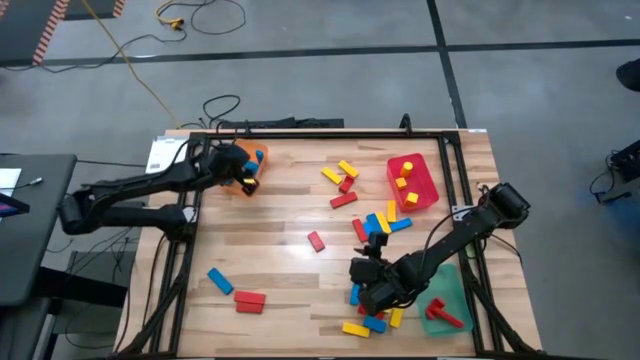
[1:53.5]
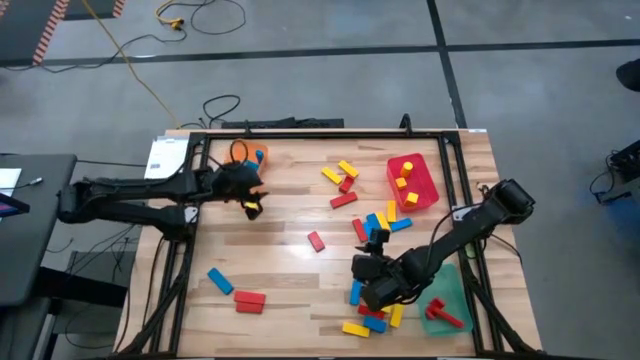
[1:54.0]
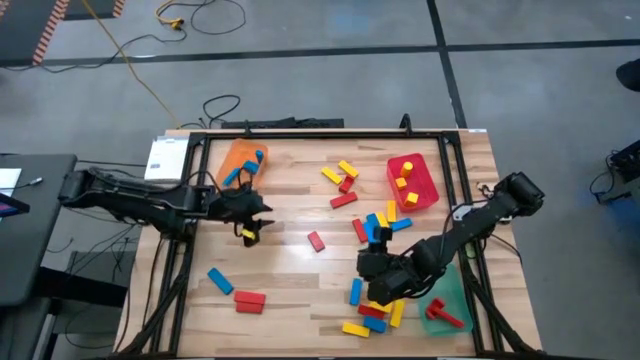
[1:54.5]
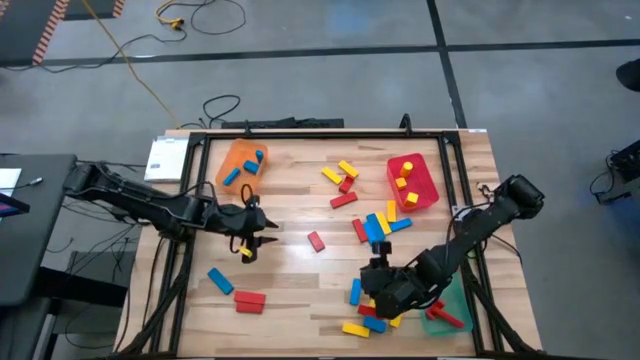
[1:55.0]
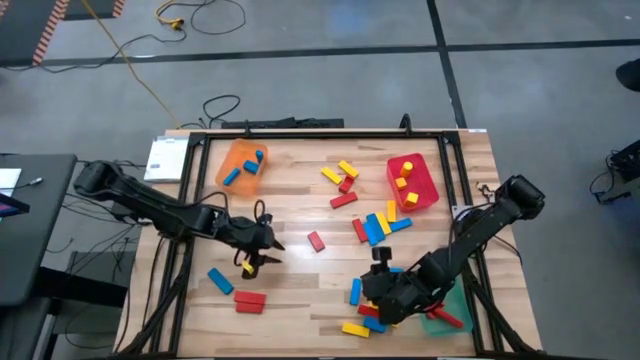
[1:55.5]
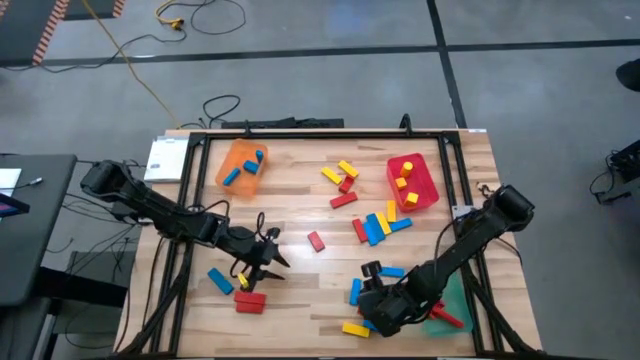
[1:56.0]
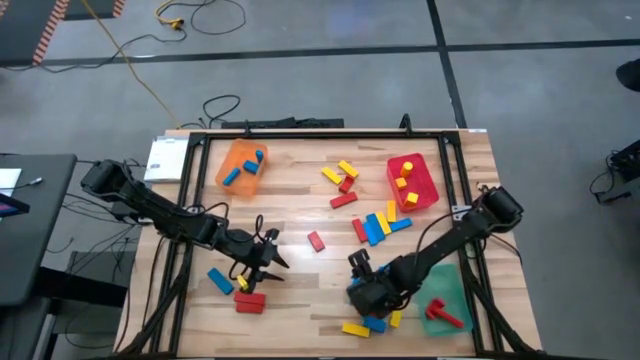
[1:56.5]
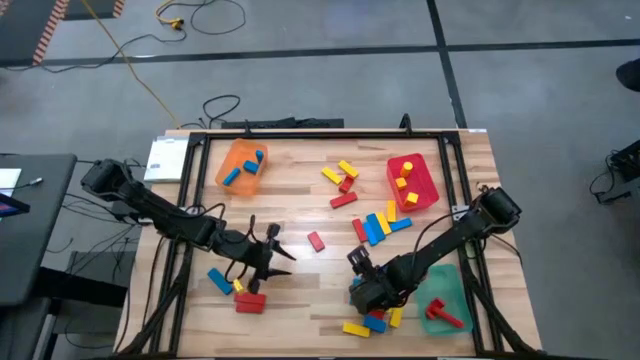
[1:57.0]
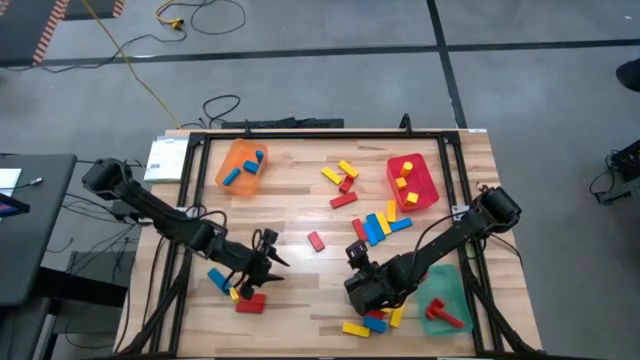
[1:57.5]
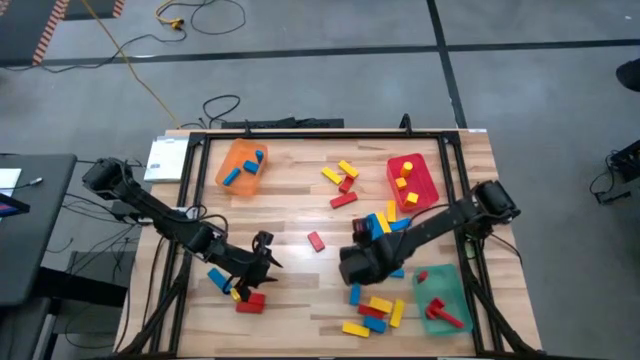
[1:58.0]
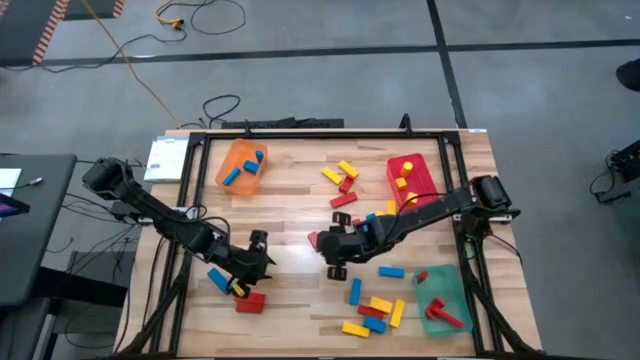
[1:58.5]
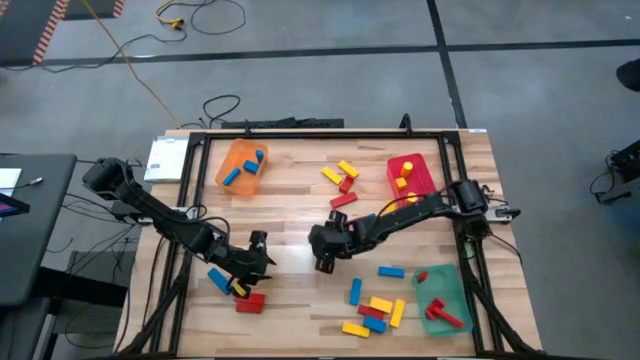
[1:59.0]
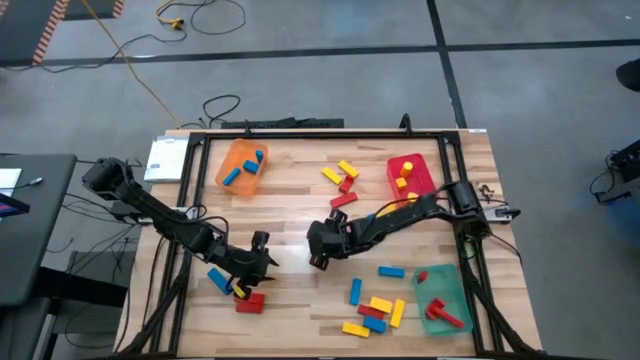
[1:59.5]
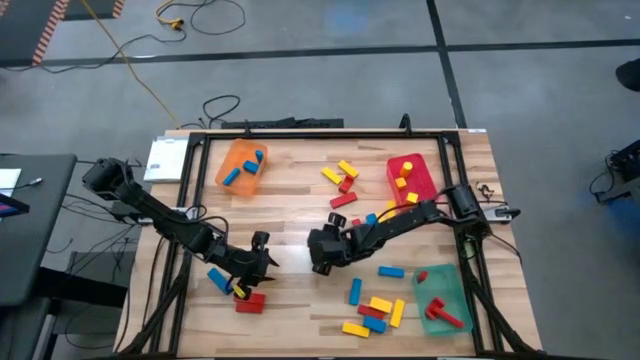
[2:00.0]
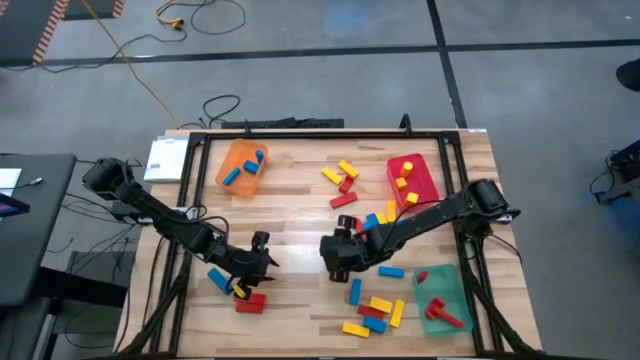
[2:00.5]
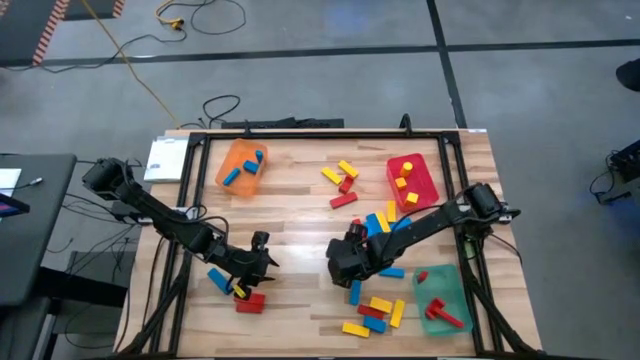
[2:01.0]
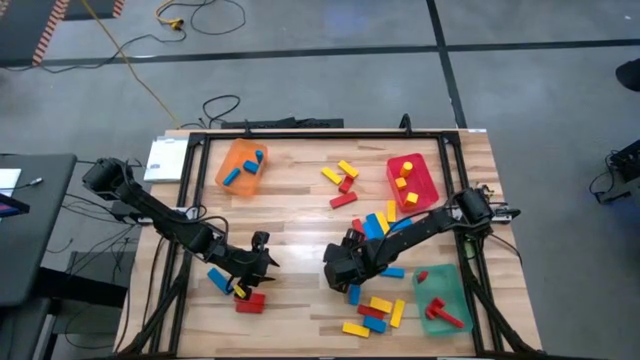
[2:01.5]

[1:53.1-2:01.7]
Task: Sort blocks
Put the red rectangle block into the green bin

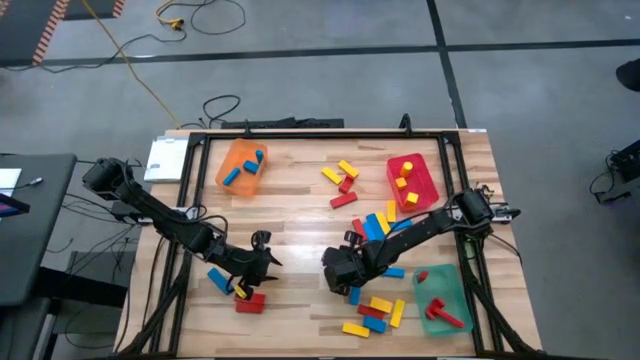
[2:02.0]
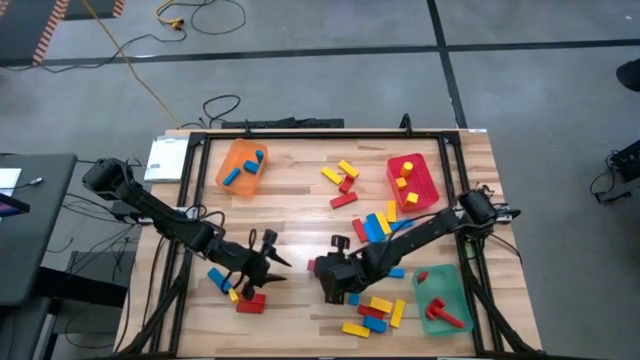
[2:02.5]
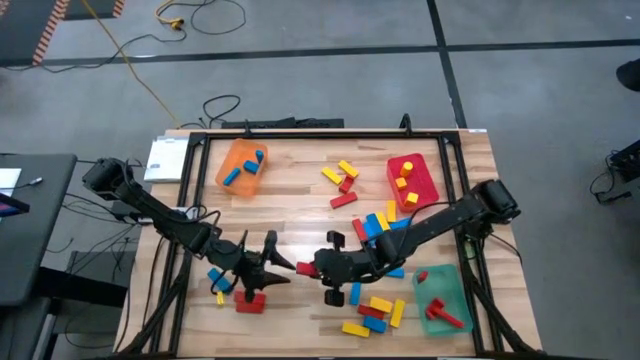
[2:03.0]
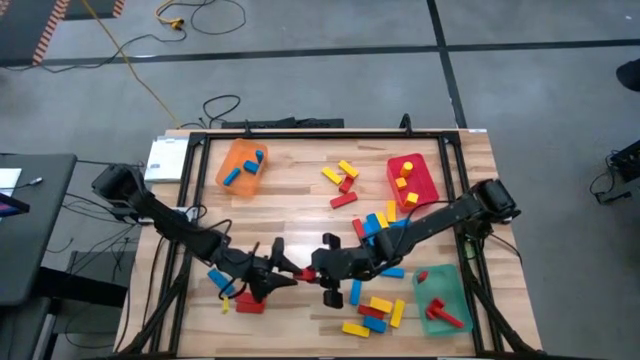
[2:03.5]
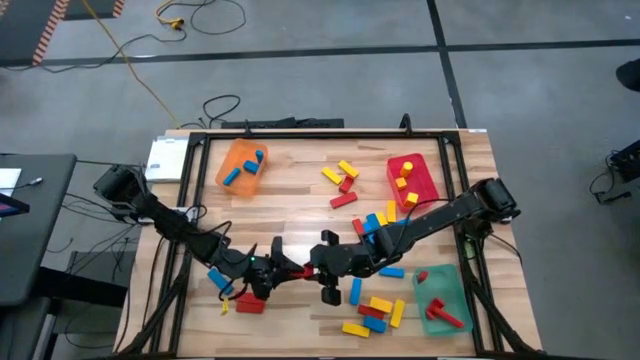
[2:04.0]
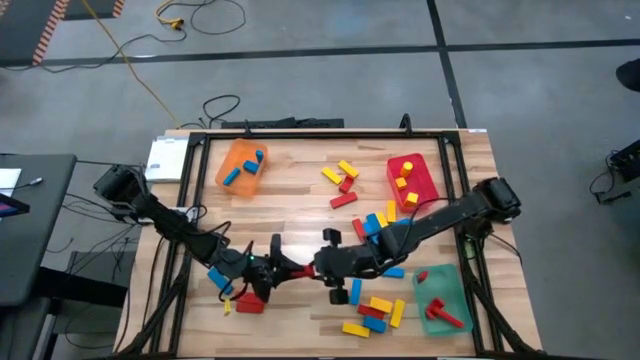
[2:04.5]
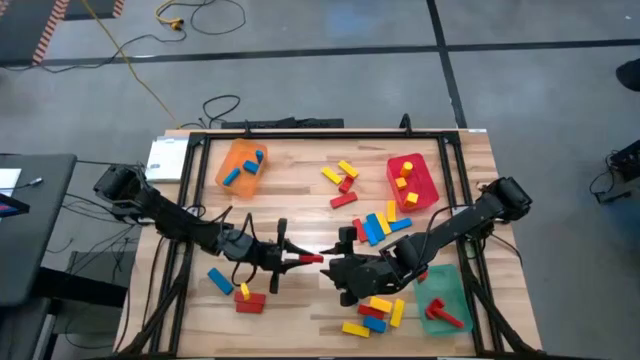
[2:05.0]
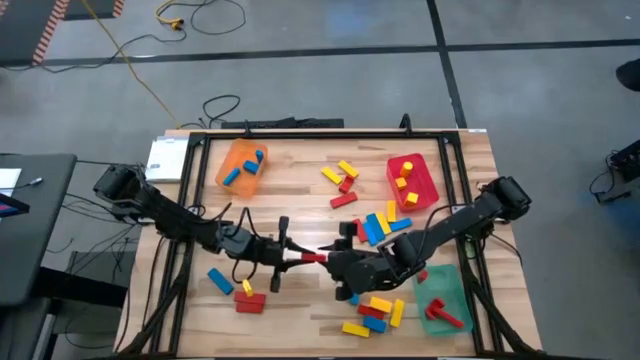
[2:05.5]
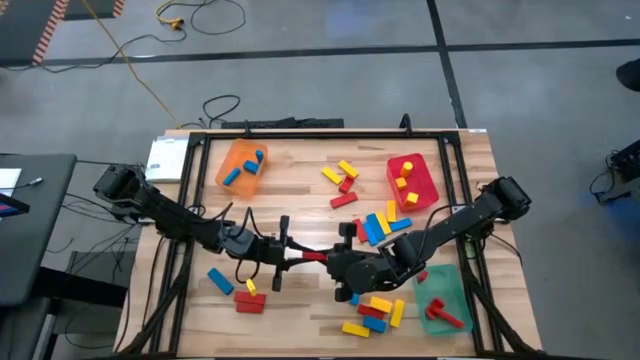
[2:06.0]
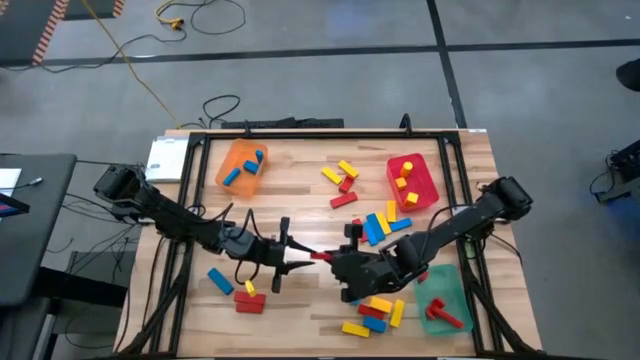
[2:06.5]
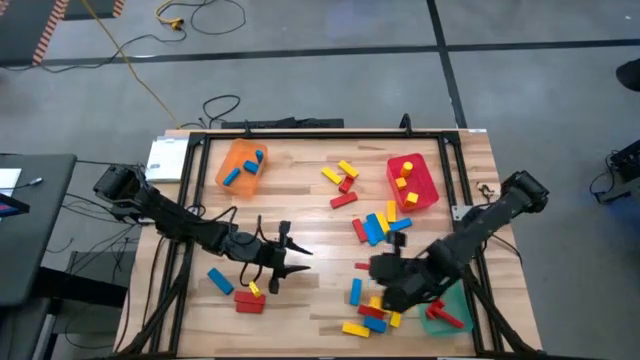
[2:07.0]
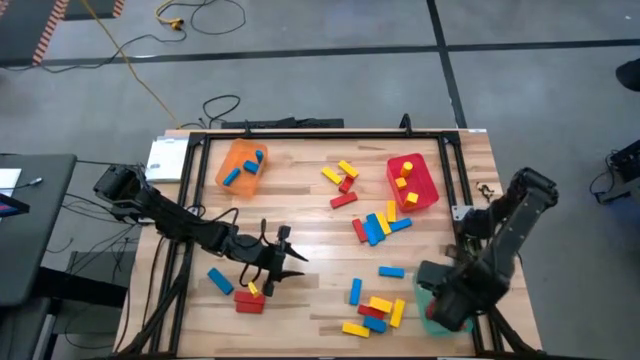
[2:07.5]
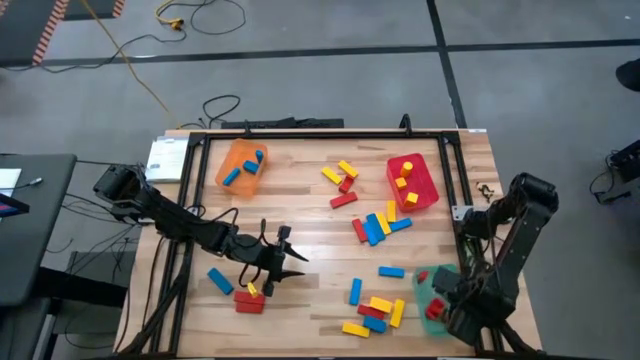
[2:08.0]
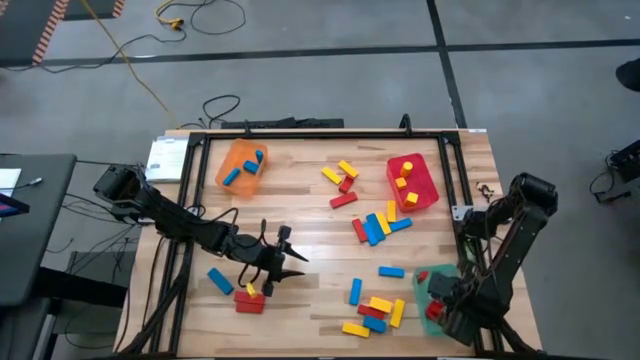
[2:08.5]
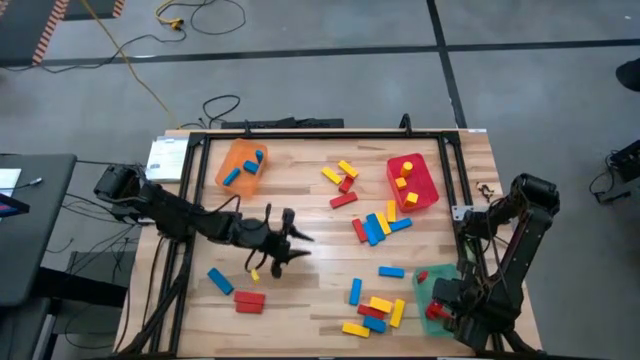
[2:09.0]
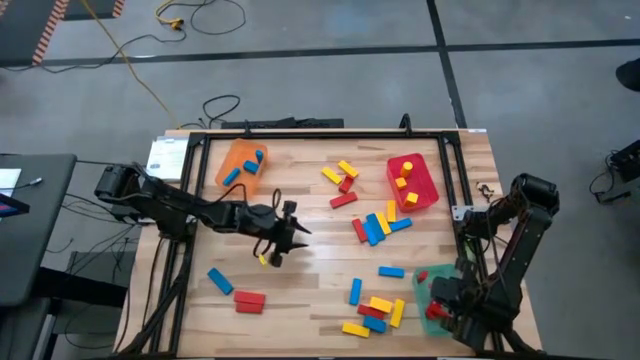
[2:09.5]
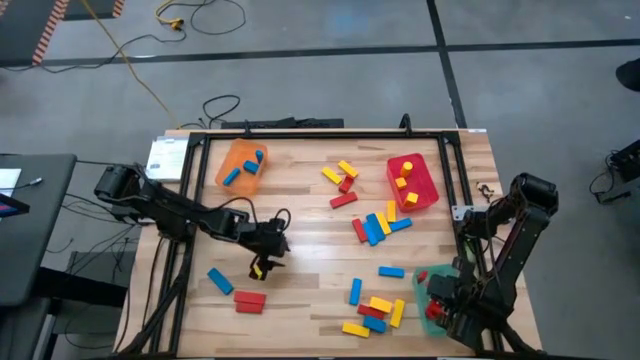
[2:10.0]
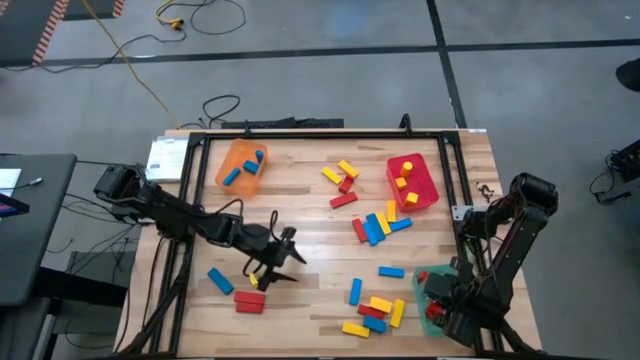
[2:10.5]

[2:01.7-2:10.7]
Put the red rectangle block into the green bin

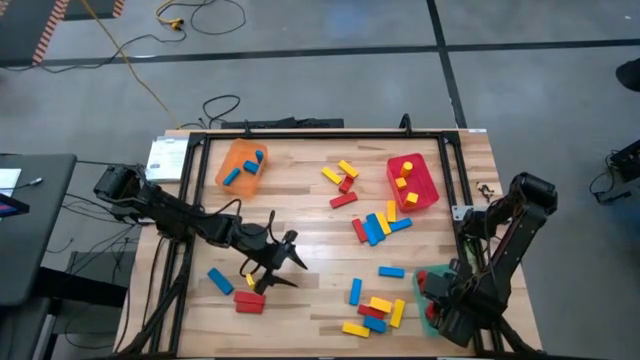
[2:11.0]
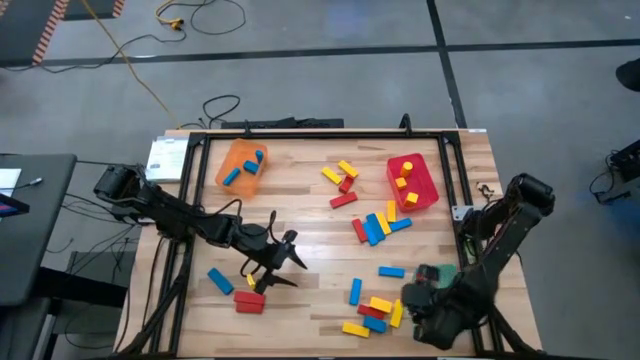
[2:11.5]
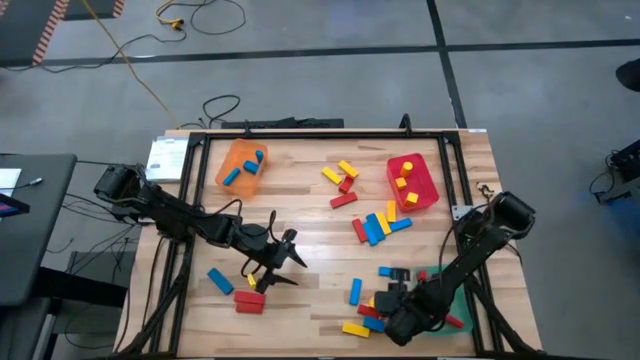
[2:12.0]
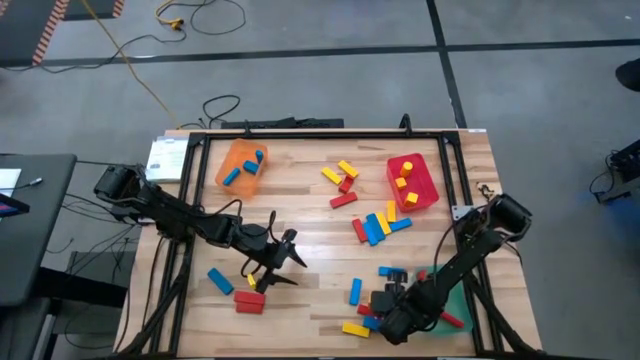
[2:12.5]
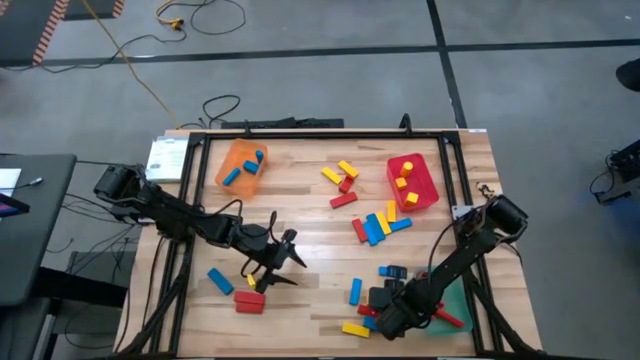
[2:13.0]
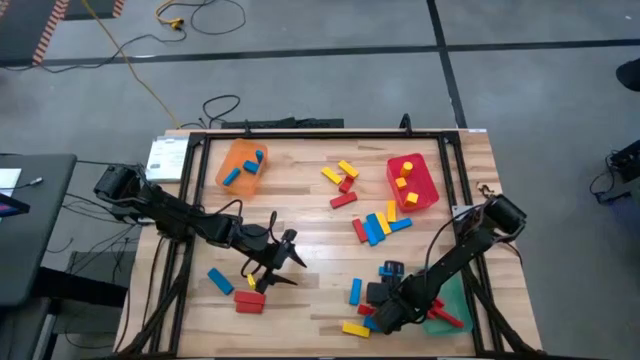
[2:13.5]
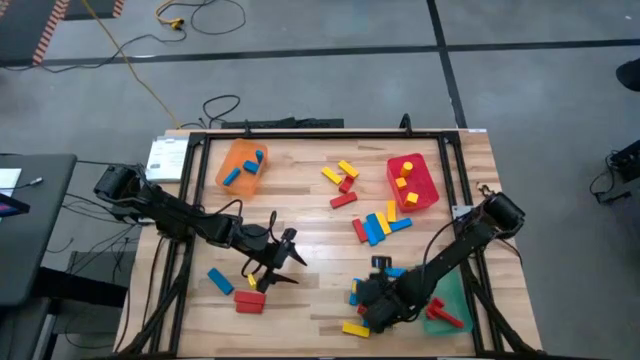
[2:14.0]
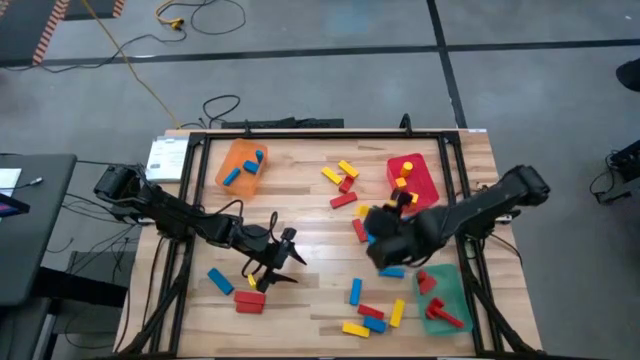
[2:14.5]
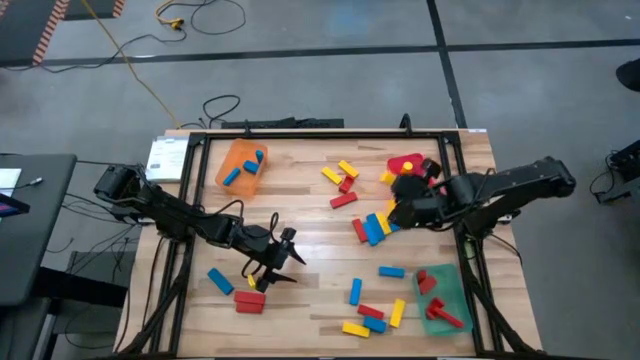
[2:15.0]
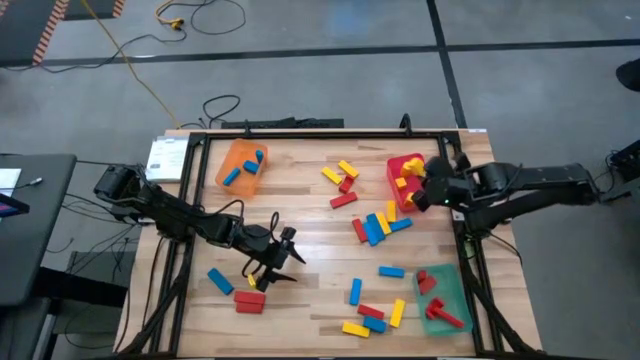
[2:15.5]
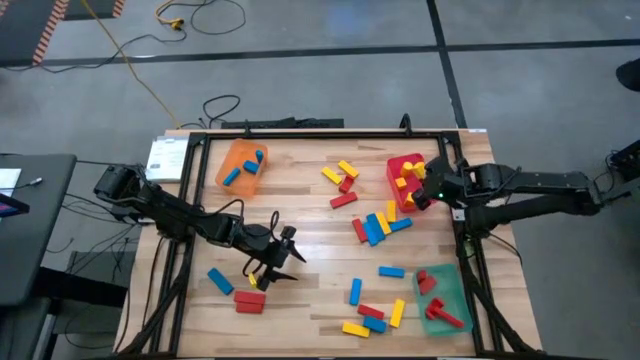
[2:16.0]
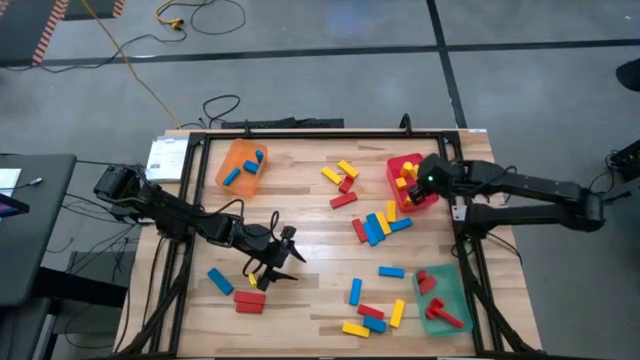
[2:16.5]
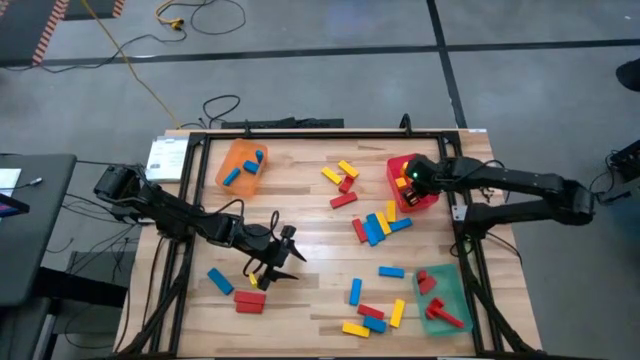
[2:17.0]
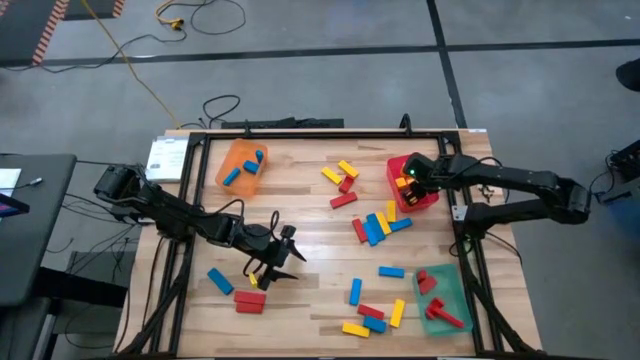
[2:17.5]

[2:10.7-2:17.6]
Put the yellow rectangle block into the red bin
